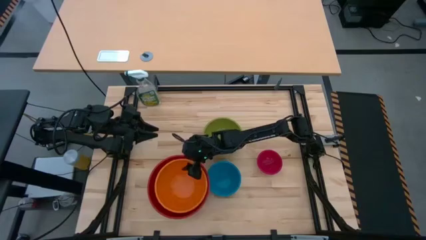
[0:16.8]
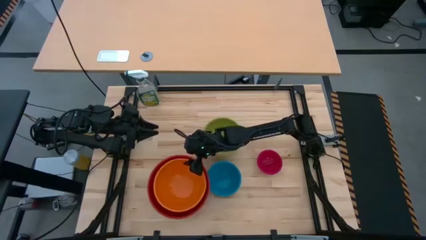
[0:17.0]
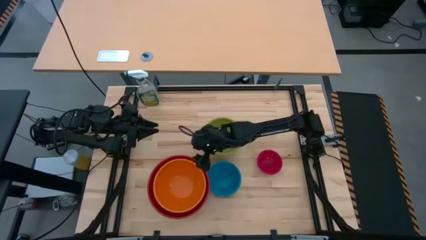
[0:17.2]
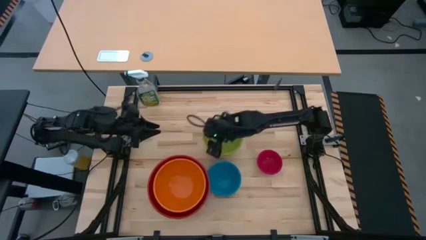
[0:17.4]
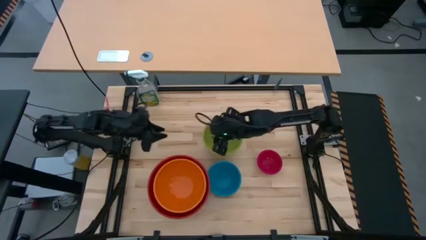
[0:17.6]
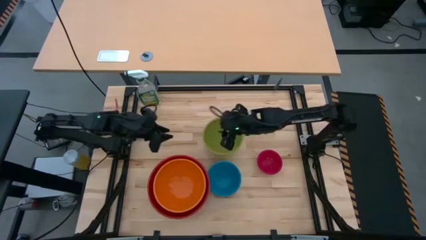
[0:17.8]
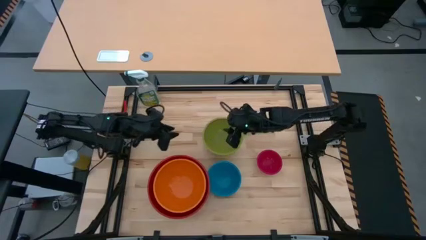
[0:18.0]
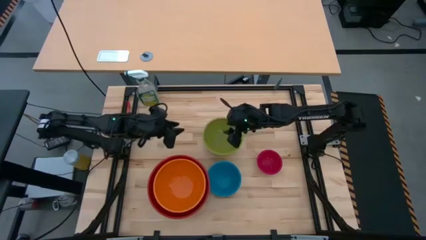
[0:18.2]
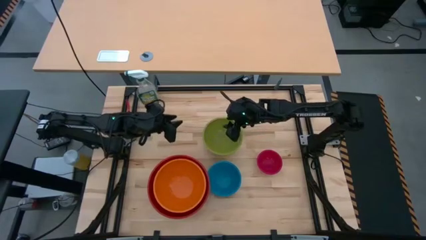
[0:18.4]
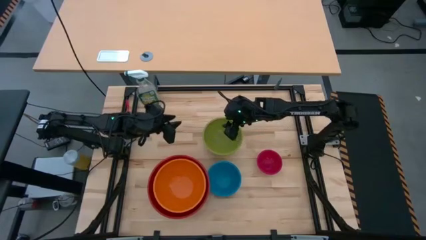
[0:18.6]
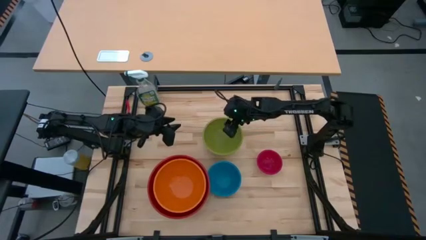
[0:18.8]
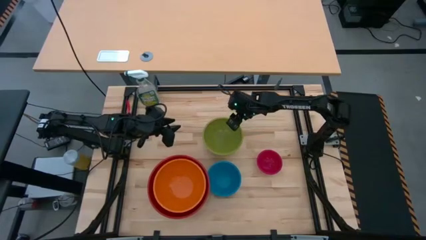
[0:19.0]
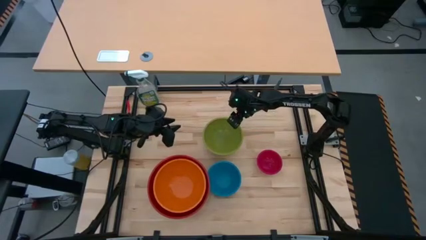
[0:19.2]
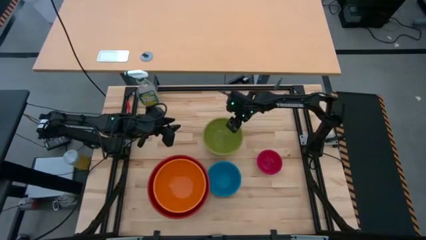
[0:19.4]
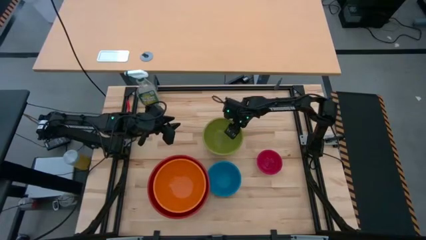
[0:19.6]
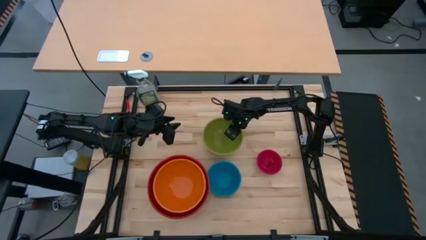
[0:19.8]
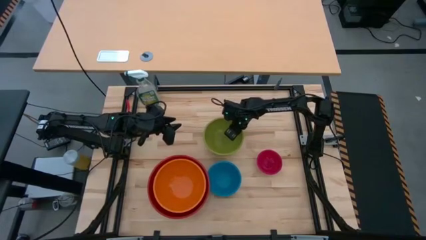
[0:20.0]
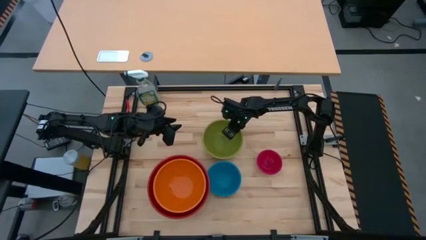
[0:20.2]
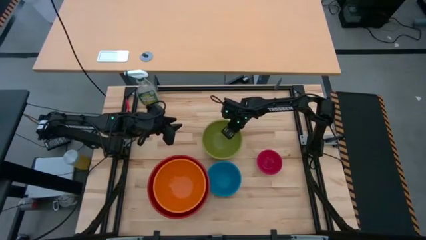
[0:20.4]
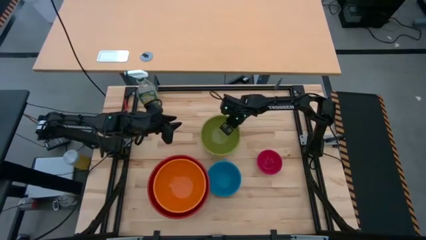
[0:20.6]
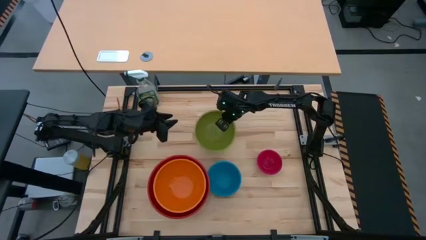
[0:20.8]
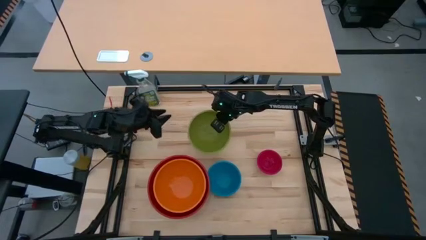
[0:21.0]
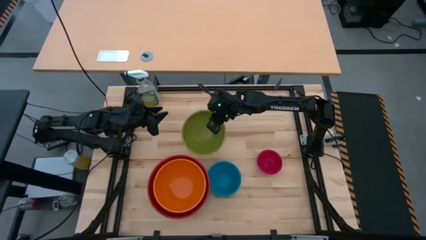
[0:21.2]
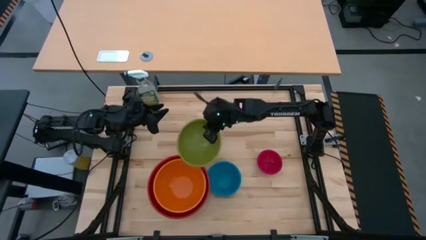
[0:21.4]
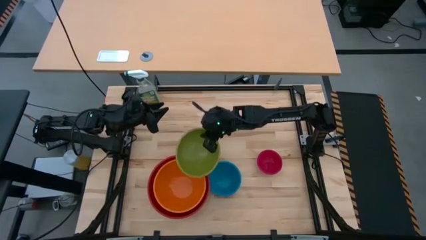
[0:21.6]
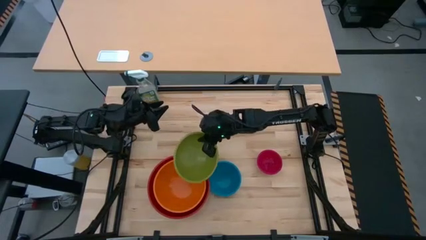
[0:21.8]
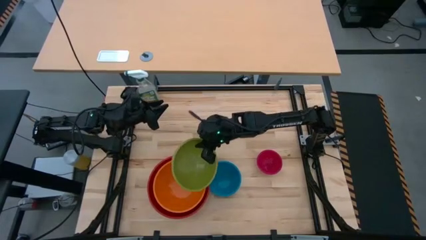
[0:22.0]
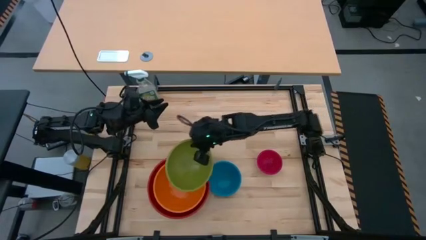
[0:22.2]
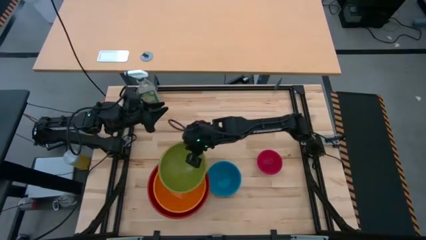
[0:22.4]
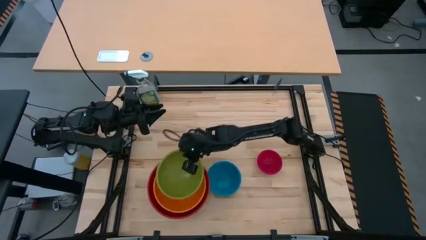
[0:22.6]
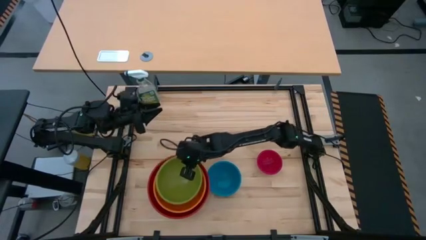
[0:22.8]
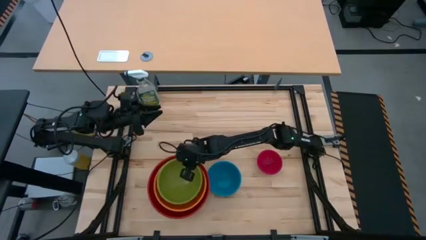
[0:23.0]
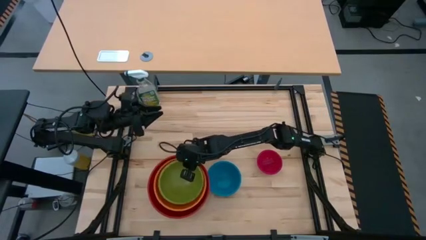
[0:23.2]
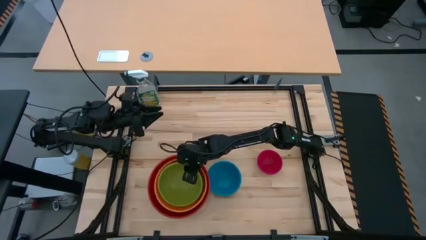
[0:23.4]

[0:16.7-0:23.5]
Stack the light green bowl on top of the orange bowl

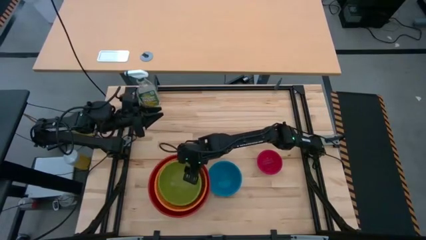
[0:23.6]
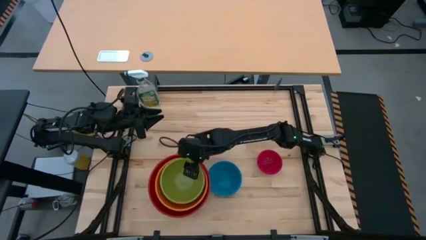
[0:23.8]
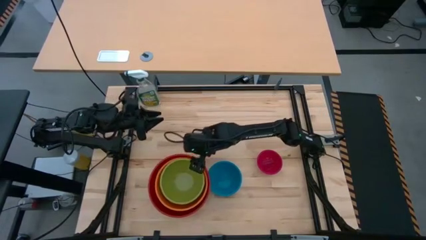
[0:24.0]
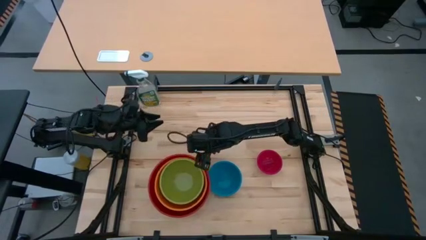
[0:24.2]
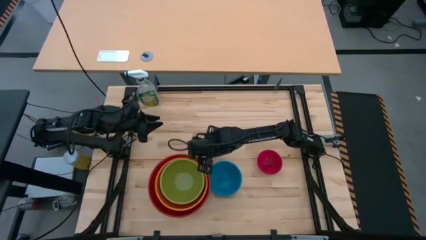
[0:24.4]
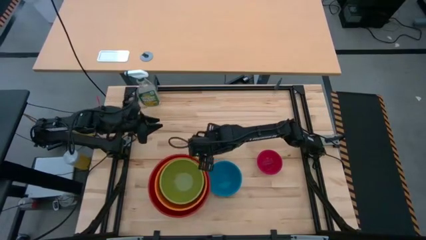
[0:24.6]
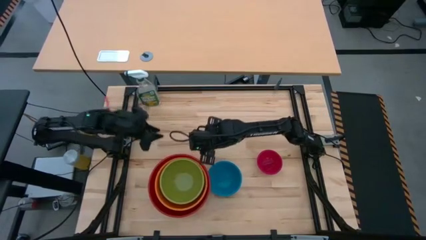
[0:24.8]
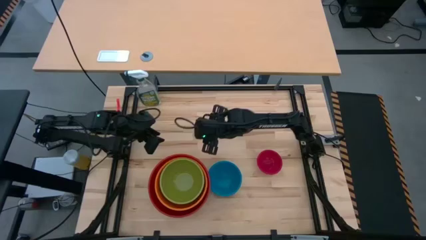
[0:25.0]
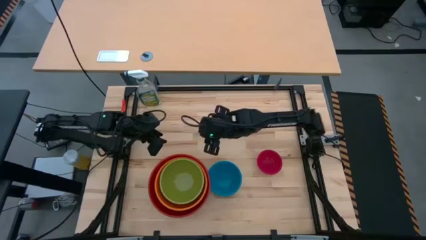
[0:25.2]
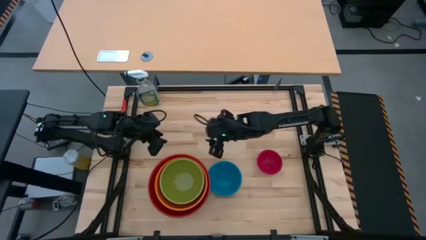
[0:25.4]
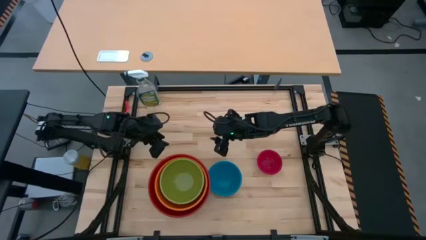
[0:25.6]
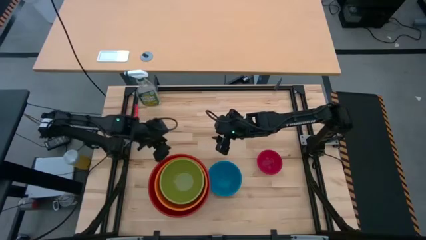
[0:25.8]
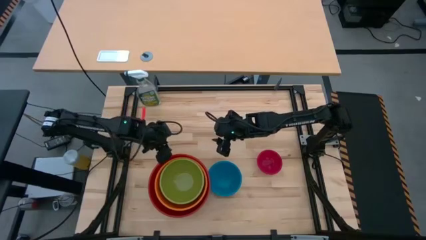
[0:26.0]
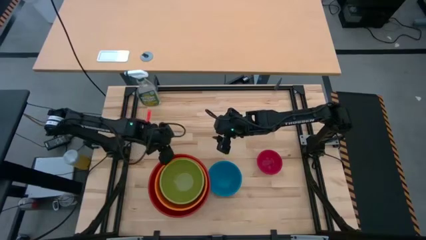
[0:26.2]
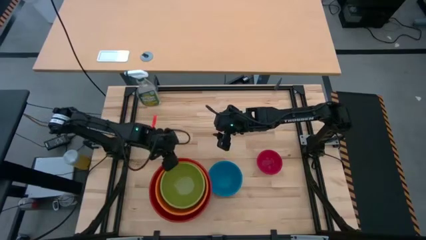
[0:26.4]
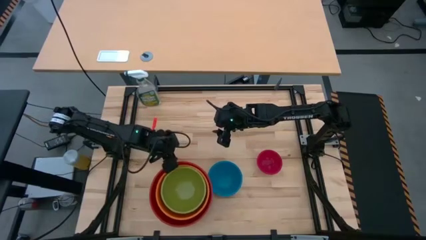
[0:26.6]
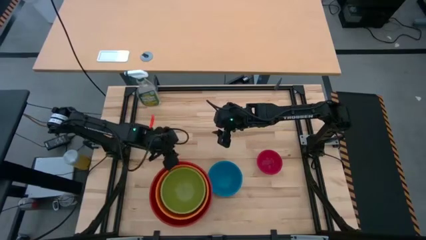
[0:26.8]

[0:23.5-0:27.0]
Adjust the stacked bowls on the table

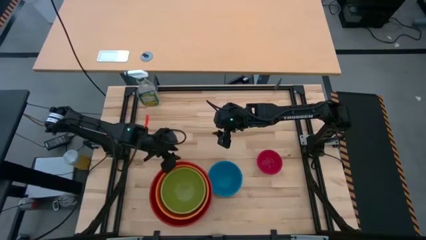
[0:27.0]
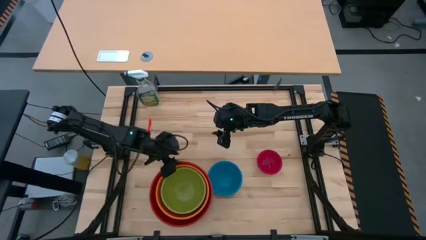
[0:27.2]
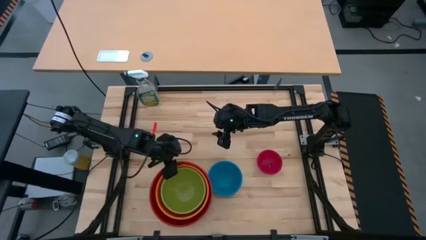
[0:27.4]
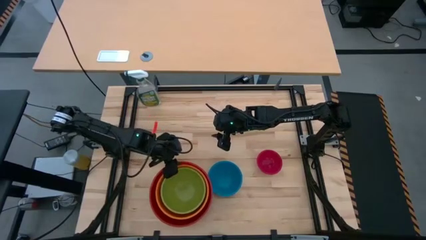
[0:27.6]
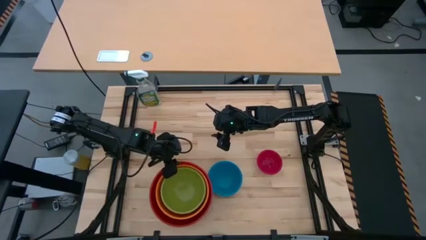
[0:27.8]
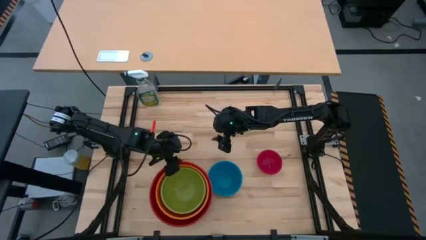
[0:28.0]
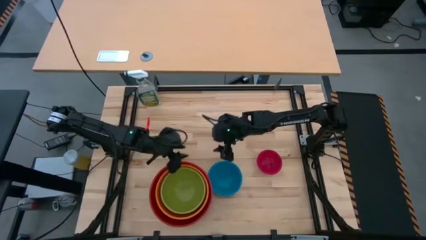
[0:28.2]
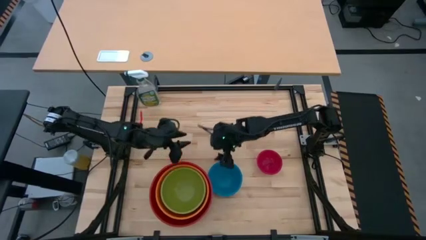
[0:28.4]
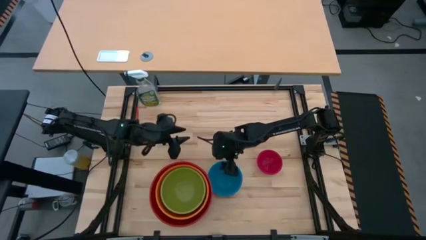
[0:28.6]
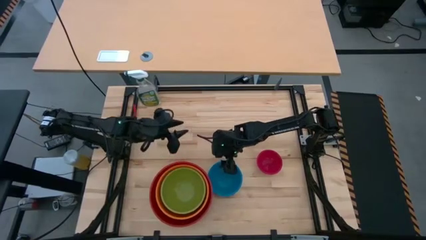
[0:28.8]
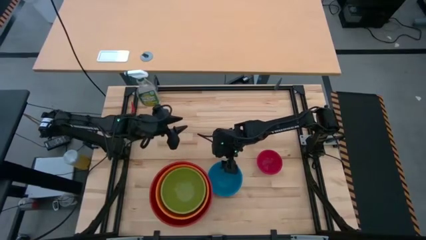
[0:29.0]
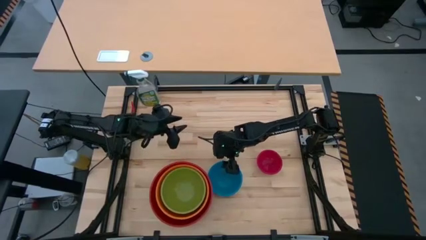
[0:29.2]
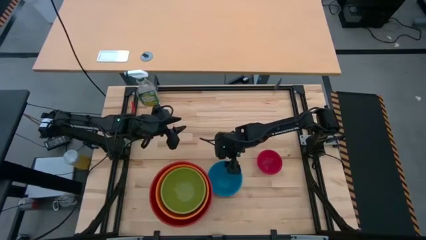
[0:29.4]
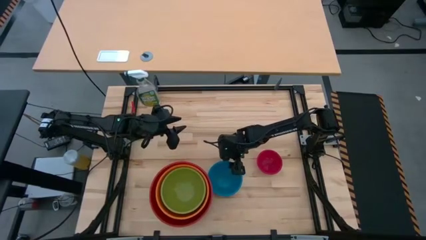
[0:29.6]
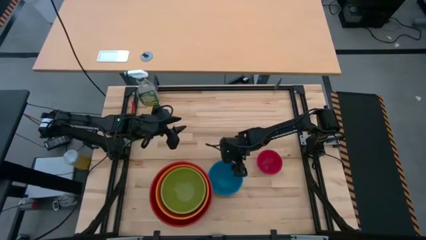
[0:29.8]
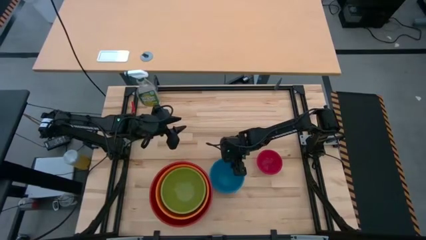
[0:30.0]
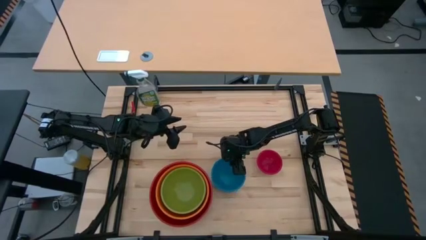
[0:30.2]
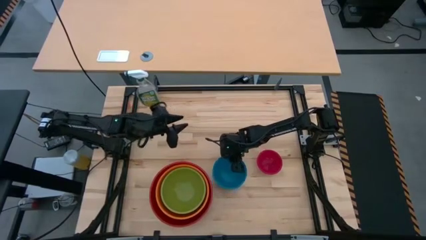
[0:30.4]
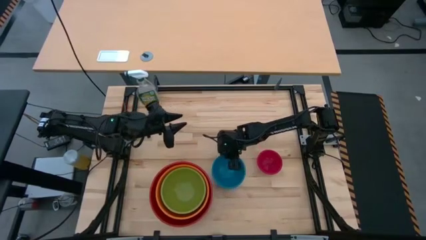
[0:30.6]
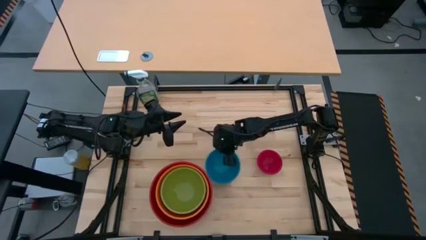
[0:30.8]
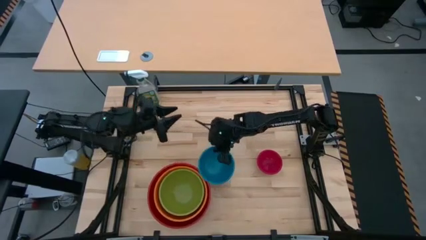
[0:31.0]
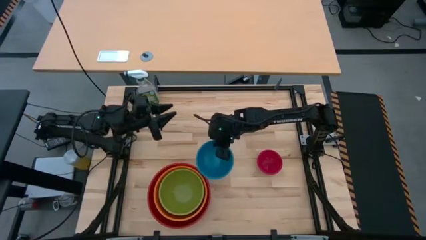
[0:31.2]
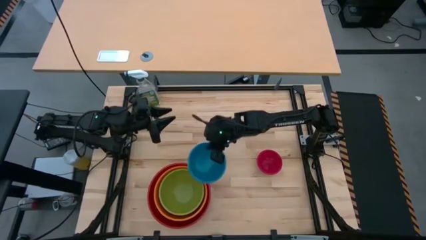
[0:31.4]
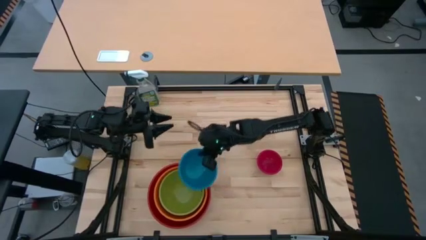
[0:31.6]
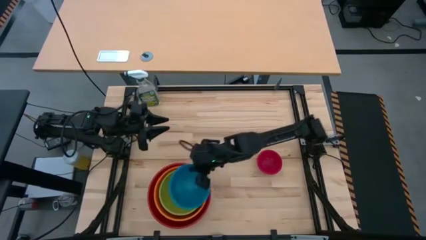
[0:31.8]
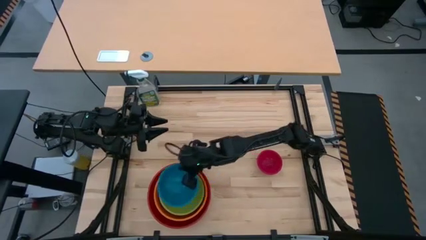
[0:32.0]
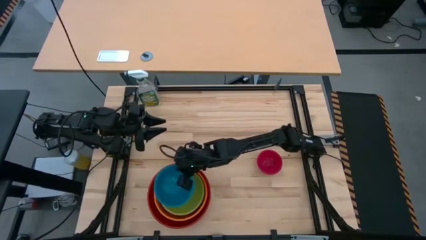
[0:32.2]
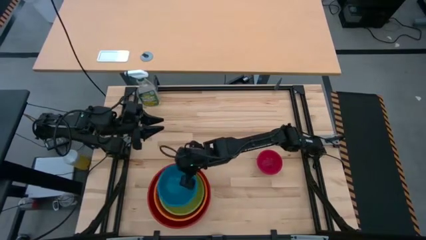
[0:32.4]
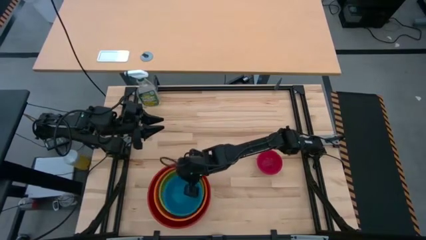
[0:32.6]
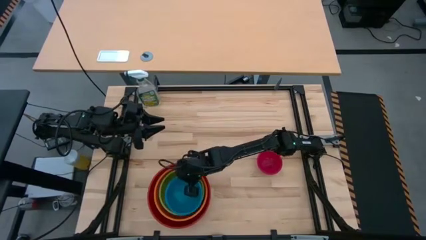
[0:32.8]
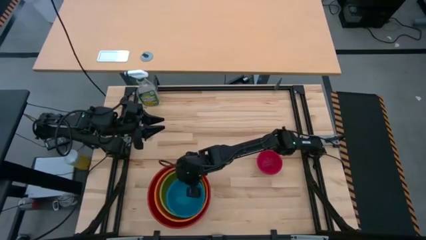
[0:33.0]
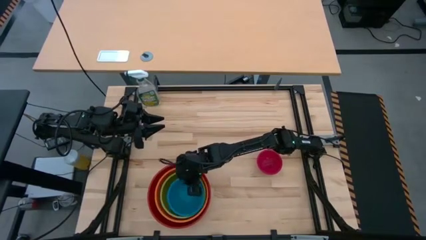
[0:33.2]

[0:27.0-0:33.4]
Stack the blue bowl on top of the light green bowl
